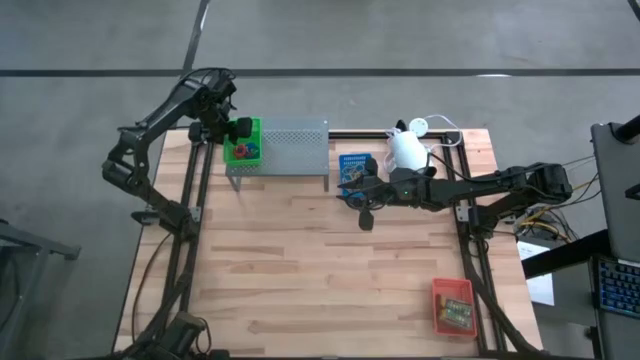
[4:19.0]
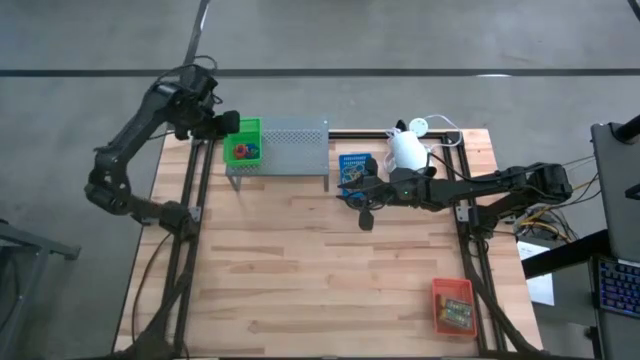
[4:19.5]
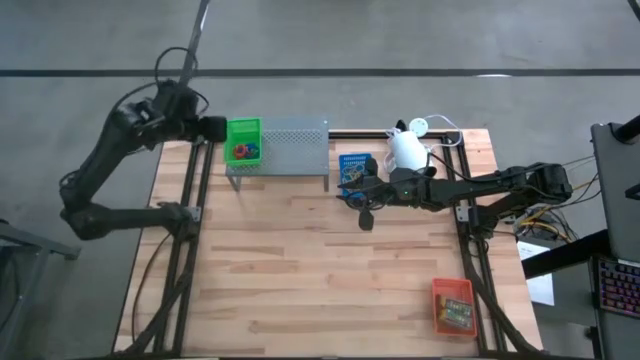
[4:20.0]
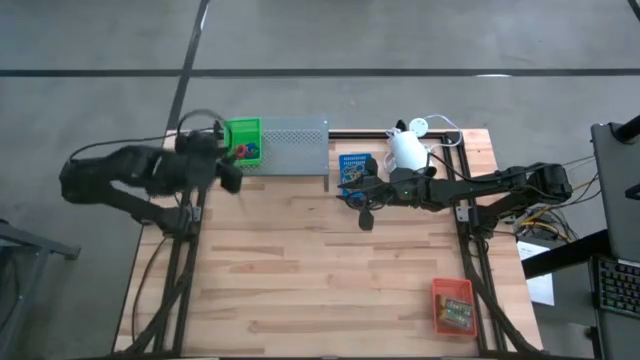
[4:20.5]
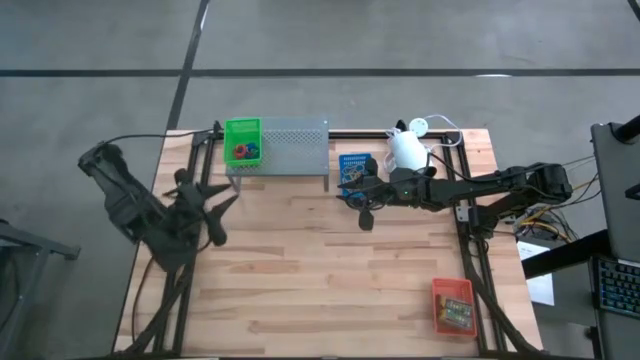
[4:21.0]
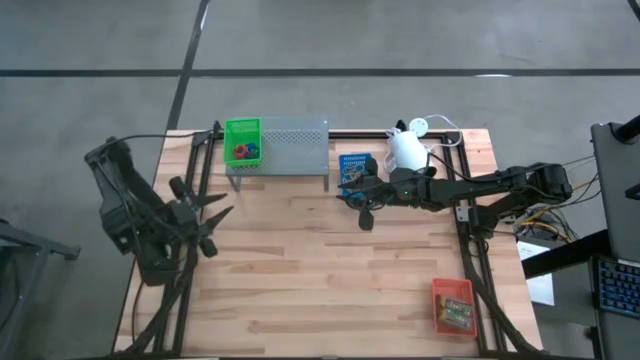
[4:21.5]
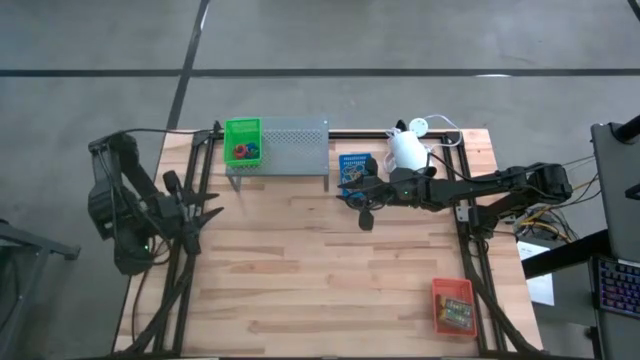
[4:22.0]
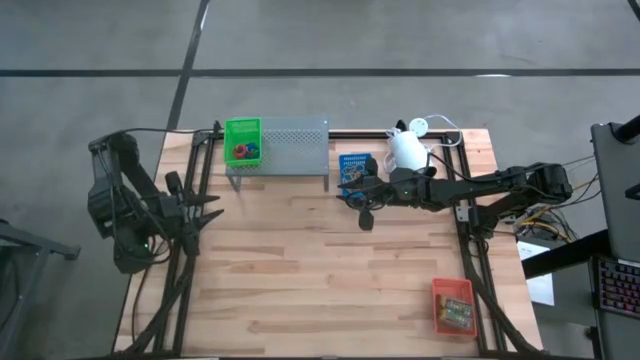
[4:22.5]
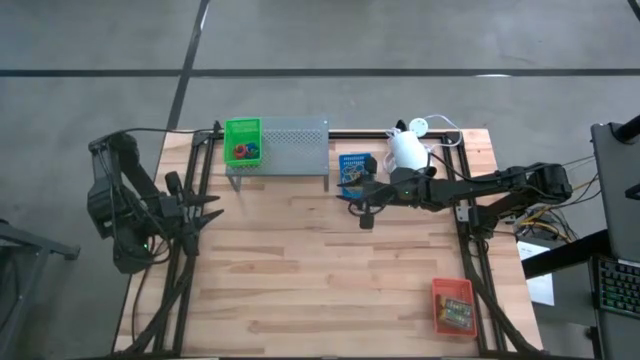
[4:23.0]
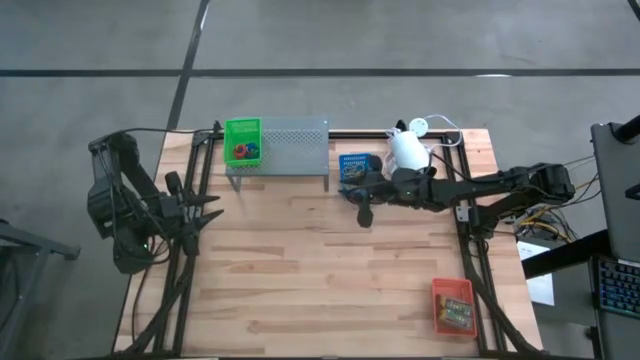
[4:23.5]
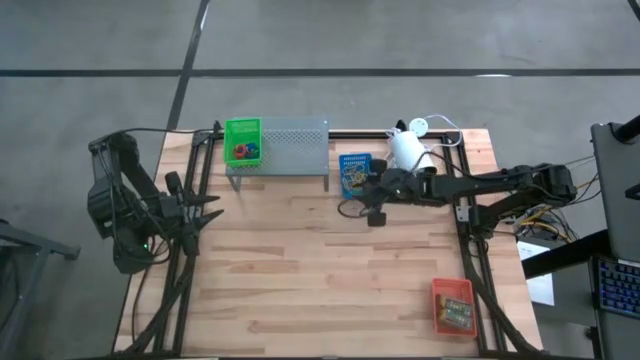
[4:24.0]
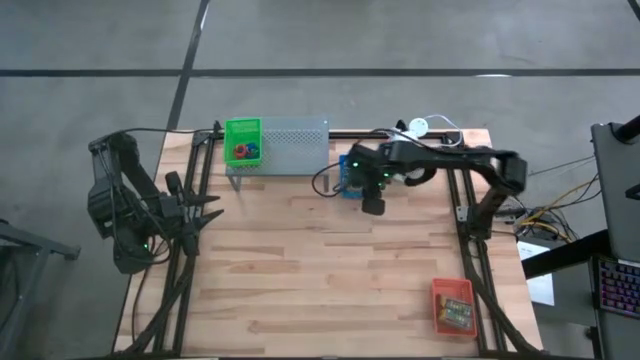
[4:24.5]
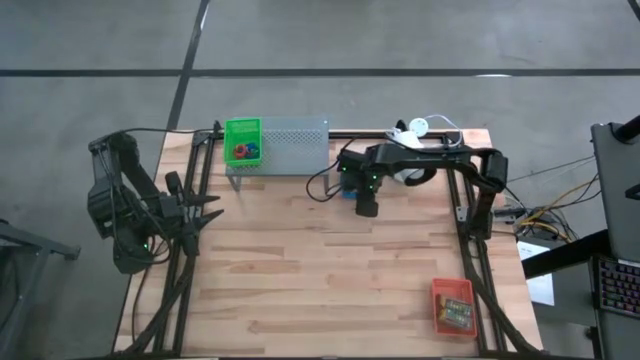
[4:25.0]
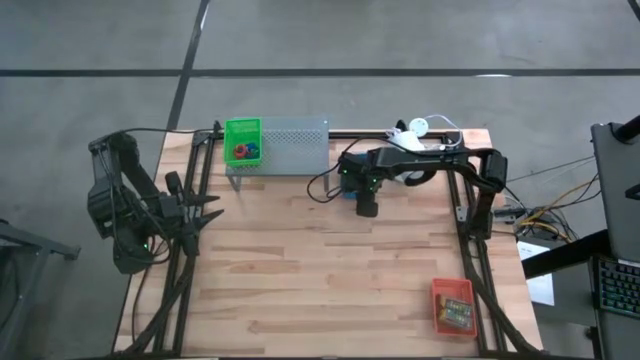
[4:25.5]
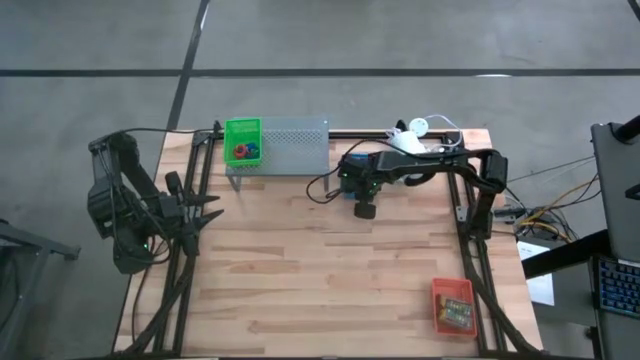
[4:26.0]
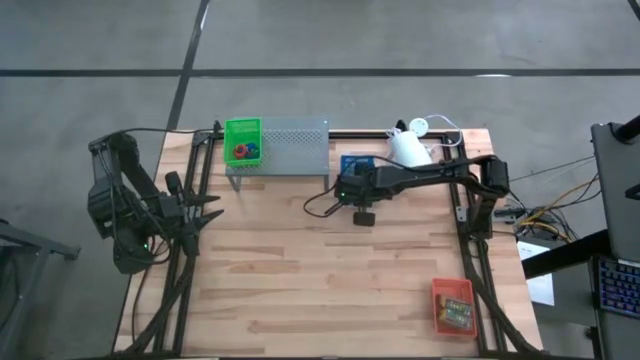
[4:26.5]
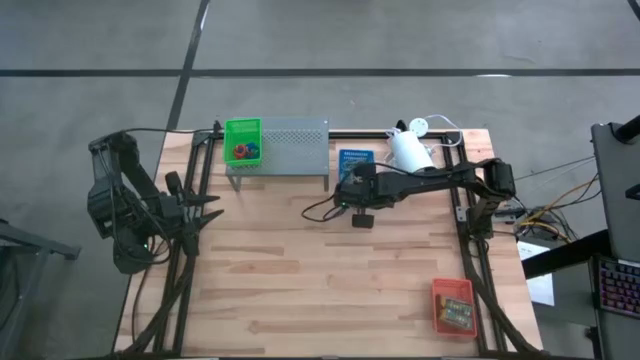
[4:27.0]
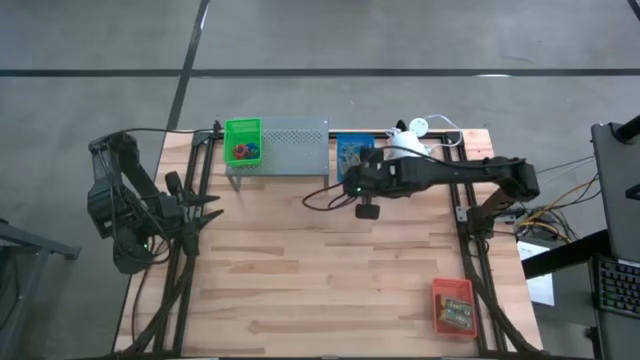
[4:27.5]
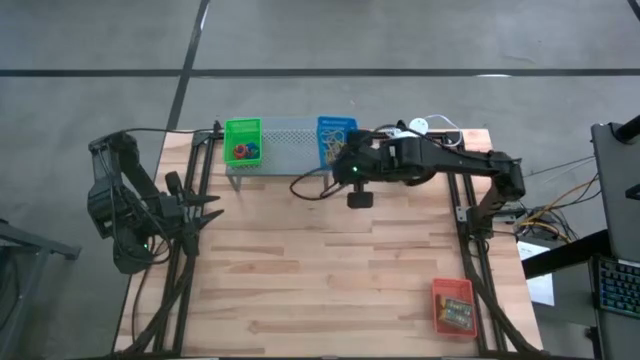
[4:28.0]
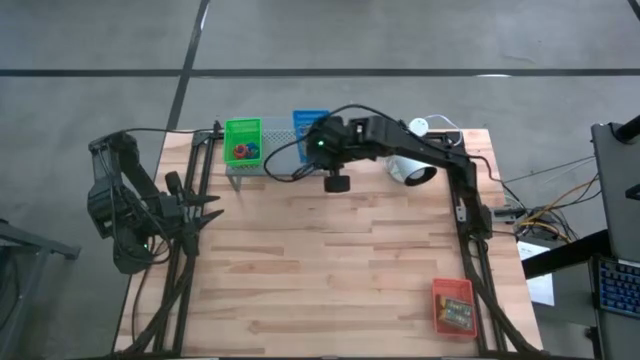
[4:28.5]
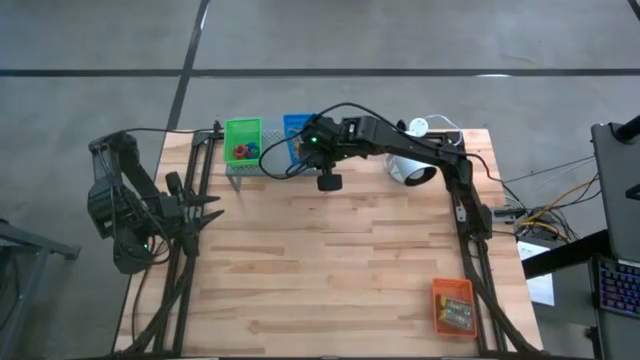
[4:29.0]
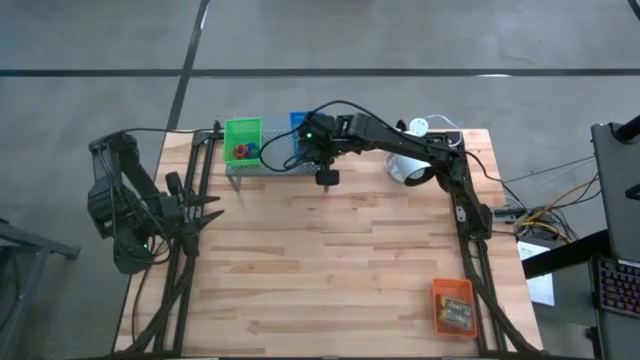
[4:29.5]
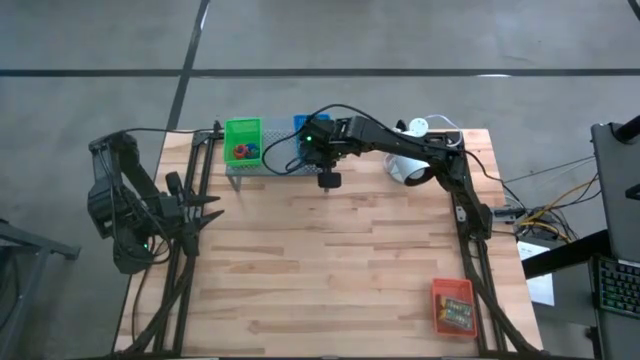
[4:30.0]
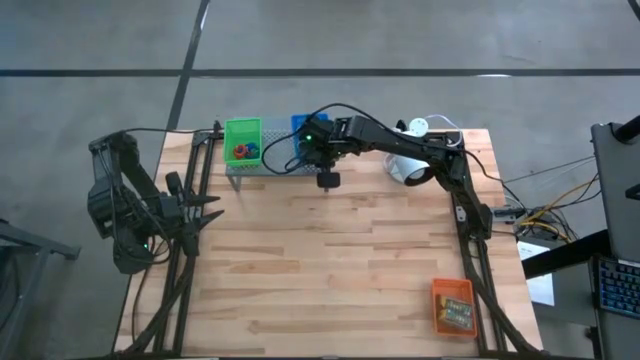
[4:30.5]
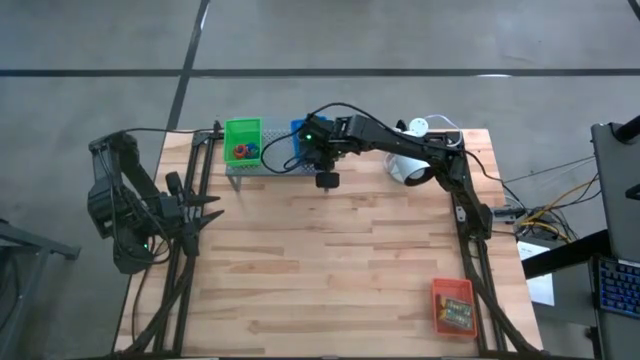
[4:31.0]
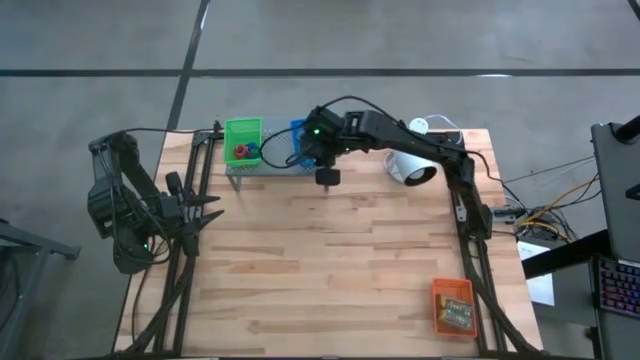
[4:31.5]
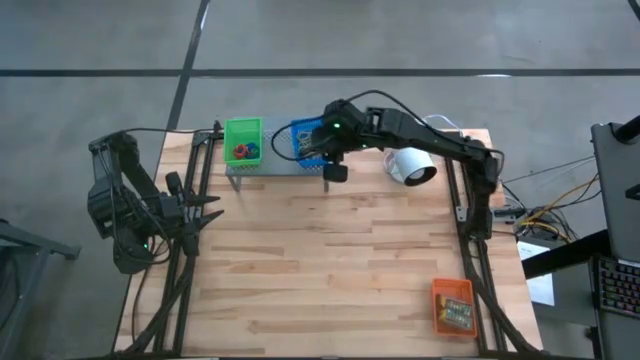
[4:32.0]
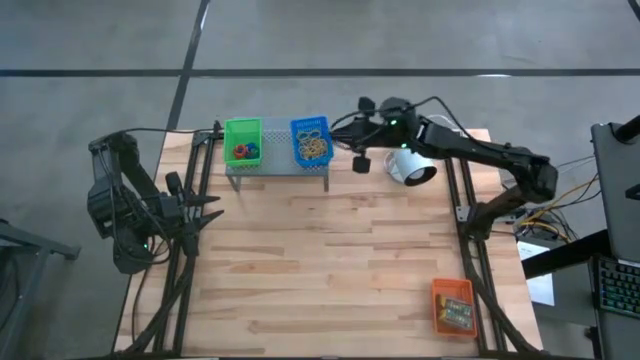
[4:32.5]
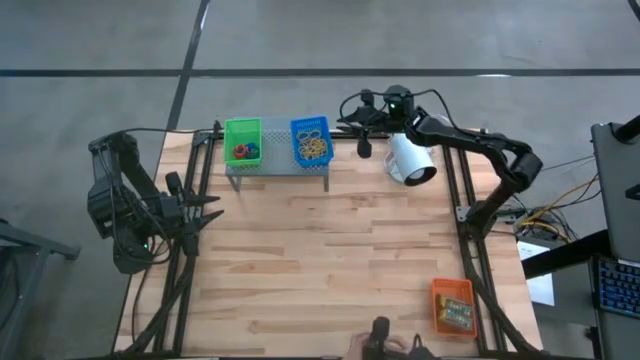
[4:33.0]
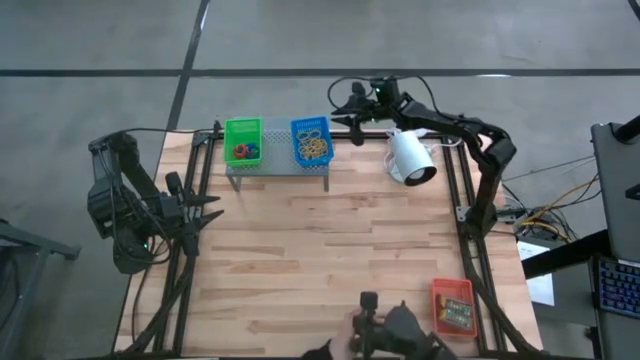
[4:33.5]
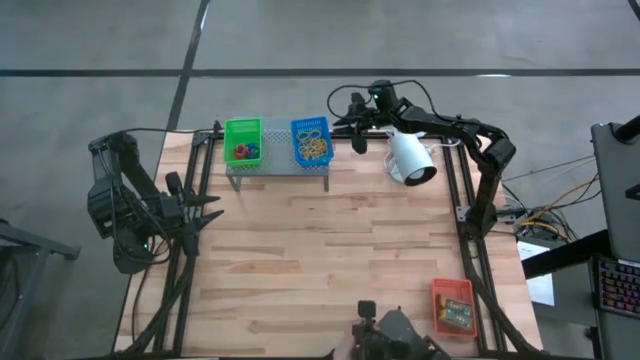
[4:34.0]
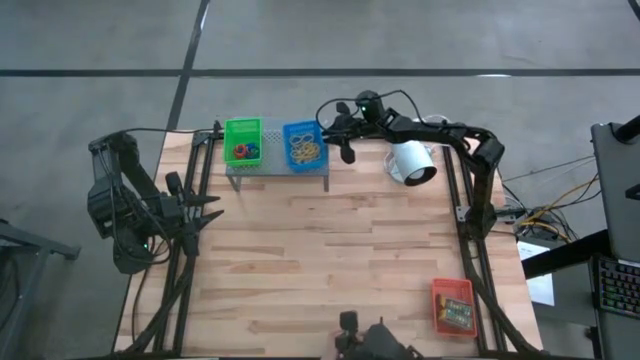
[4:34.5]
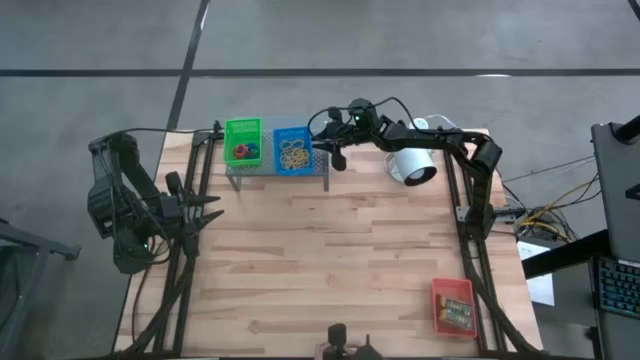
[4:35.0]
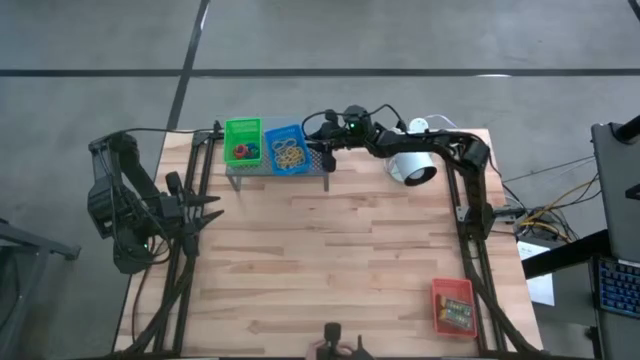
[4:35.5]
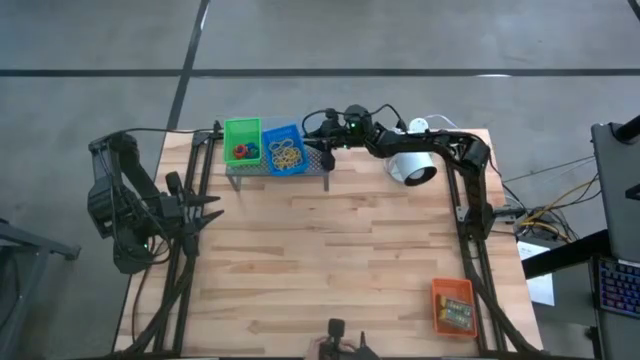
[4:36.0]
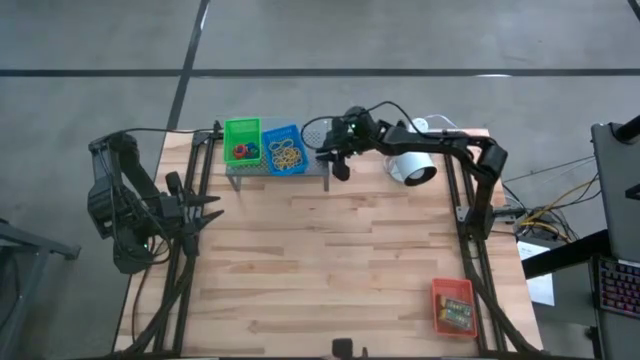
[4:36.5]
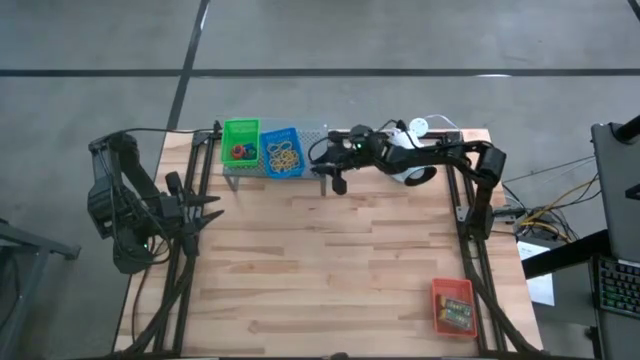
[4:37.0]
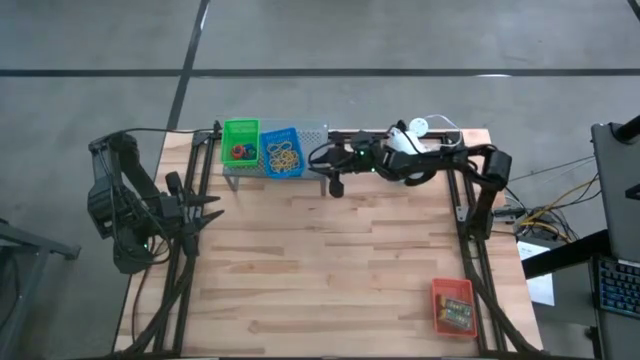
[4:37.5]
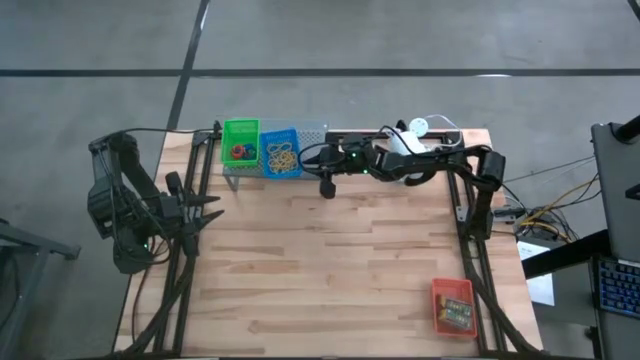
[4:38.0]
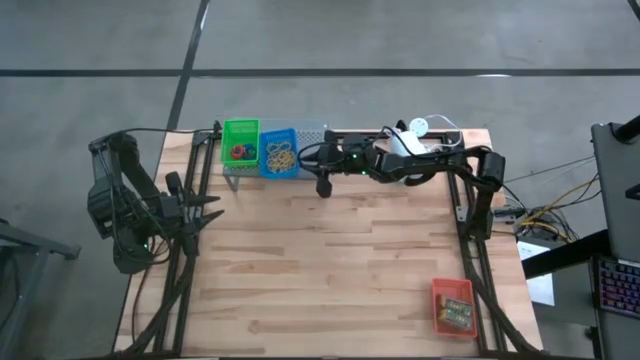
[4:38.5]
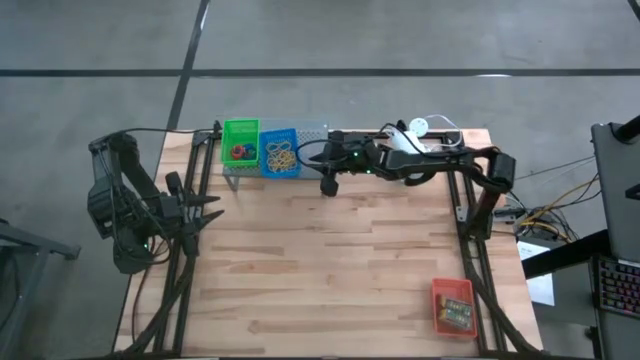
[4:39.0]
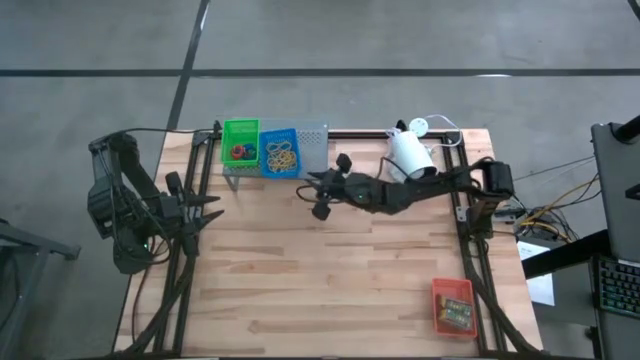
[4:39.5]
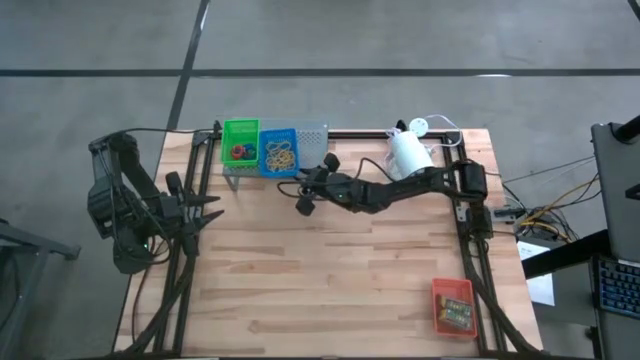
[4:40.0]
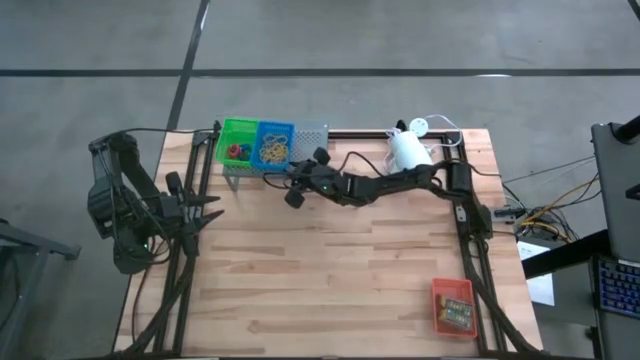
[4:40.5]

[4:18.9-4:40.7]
Task: Pick & Place Office Desk Supplies
Put the blue bin on the shelf
